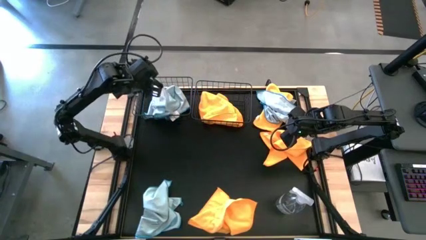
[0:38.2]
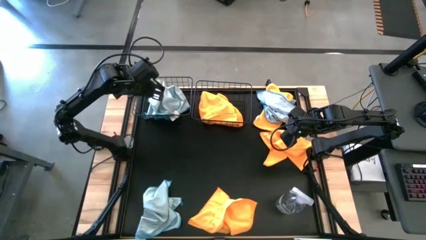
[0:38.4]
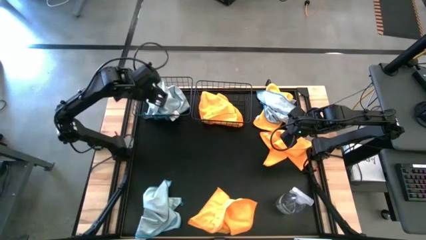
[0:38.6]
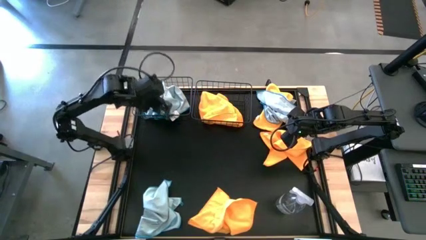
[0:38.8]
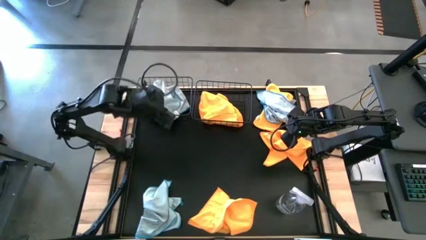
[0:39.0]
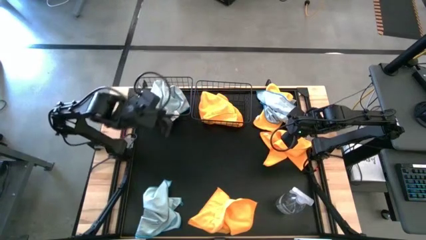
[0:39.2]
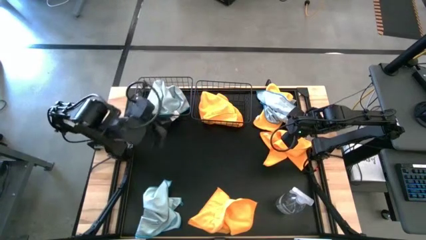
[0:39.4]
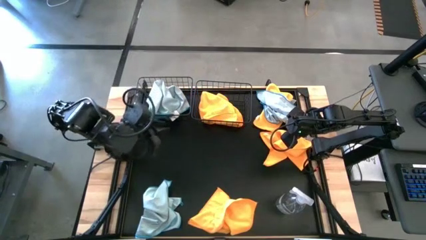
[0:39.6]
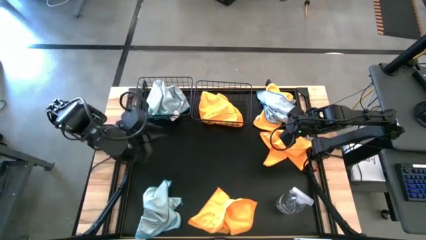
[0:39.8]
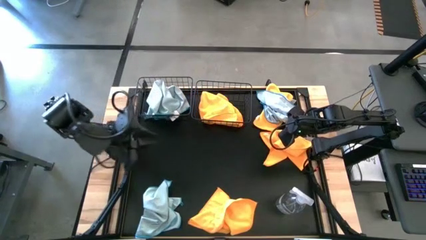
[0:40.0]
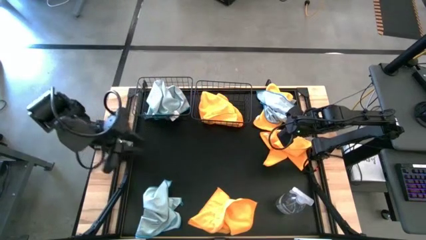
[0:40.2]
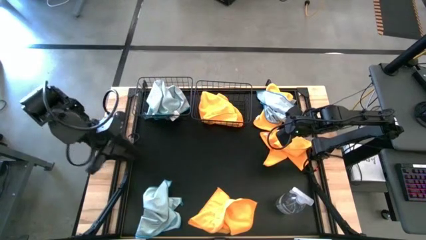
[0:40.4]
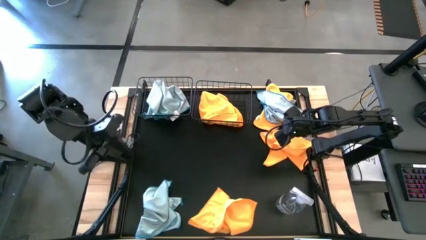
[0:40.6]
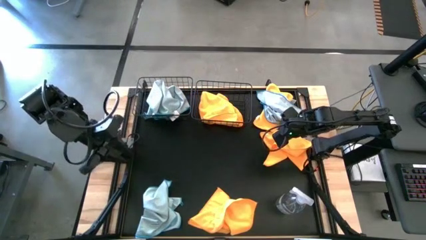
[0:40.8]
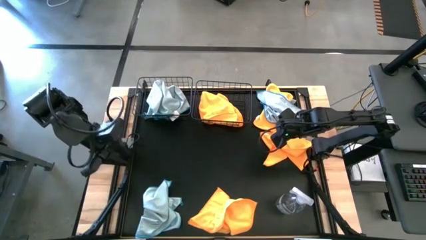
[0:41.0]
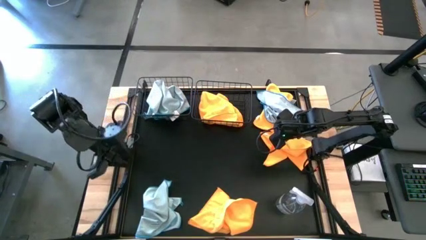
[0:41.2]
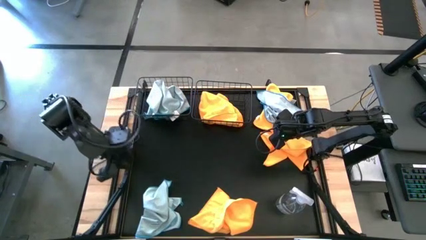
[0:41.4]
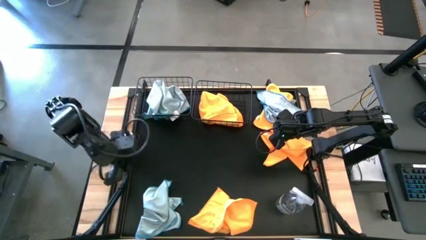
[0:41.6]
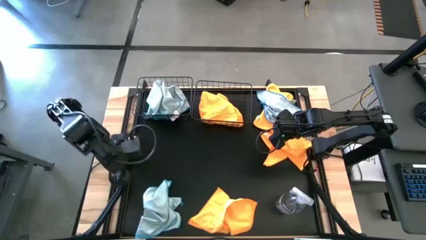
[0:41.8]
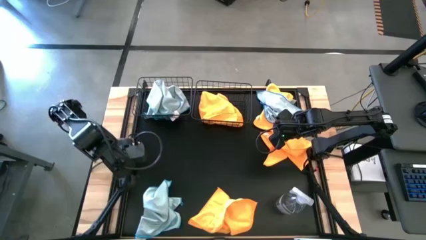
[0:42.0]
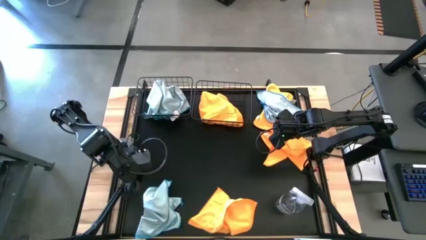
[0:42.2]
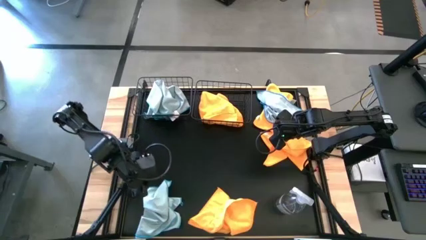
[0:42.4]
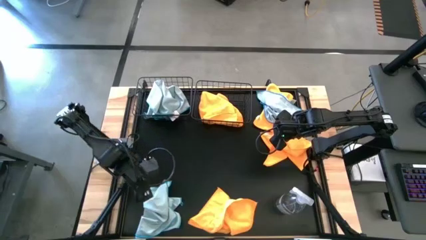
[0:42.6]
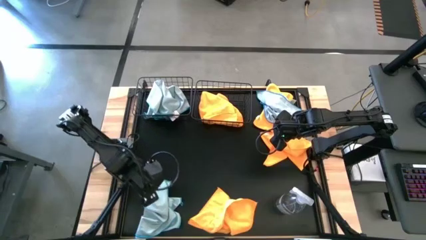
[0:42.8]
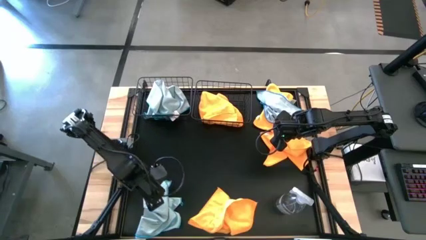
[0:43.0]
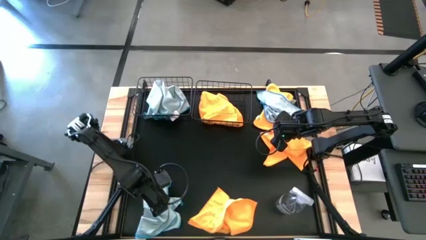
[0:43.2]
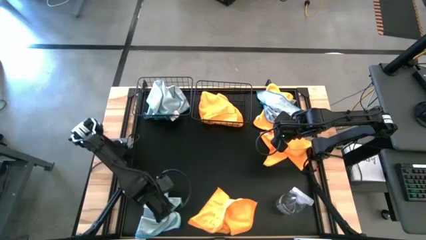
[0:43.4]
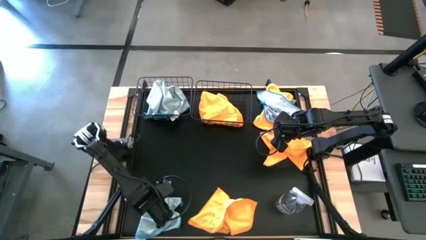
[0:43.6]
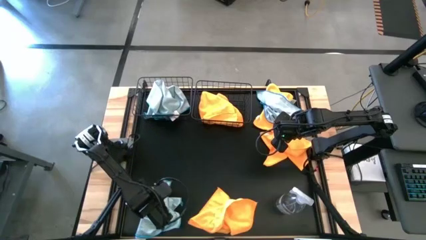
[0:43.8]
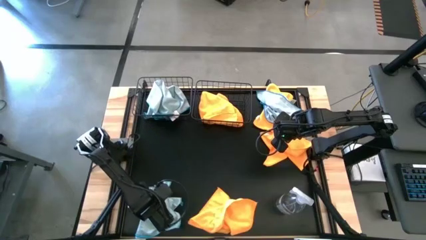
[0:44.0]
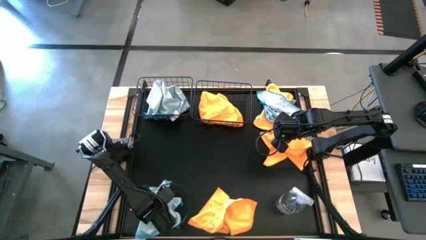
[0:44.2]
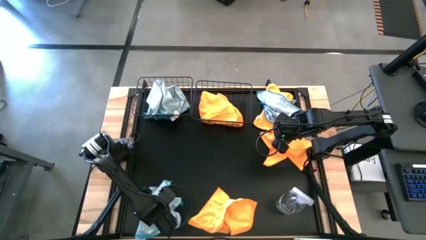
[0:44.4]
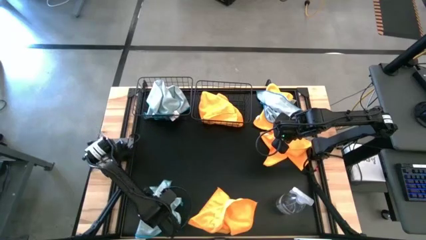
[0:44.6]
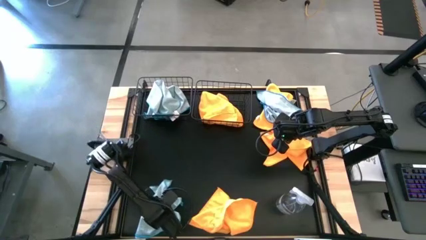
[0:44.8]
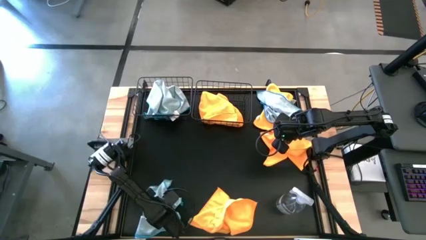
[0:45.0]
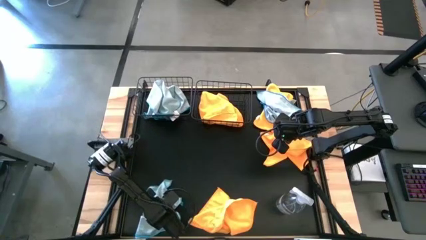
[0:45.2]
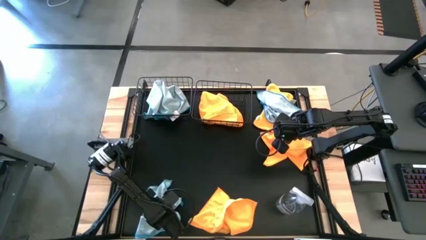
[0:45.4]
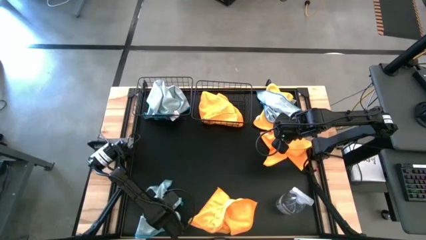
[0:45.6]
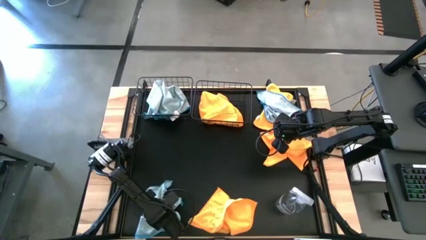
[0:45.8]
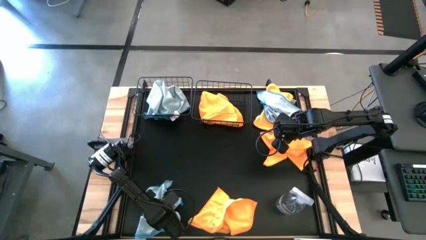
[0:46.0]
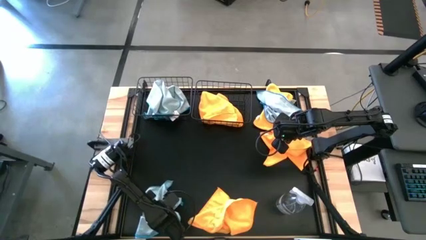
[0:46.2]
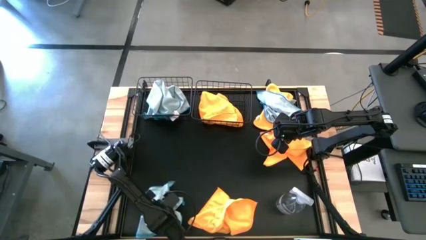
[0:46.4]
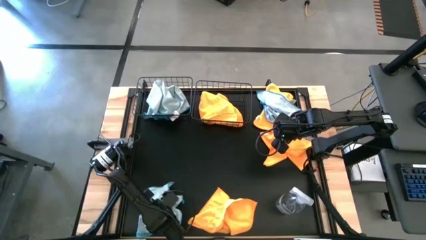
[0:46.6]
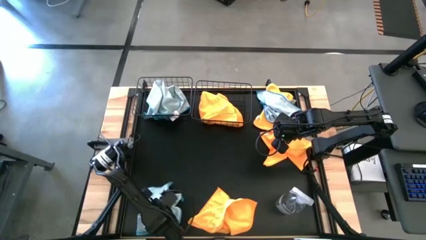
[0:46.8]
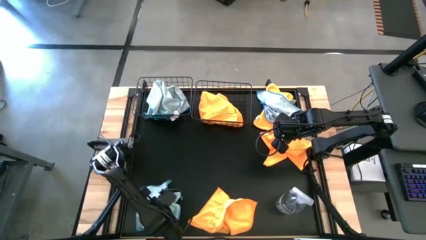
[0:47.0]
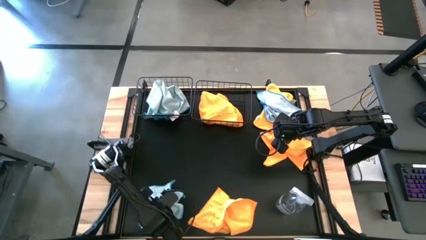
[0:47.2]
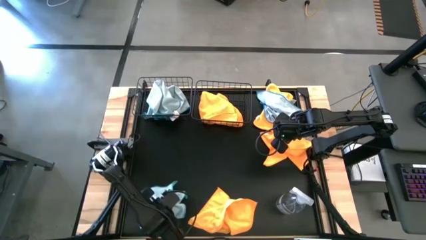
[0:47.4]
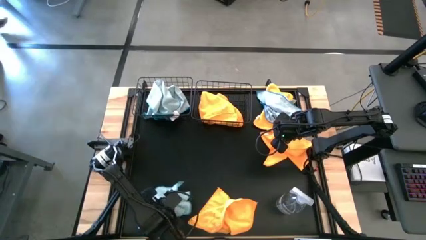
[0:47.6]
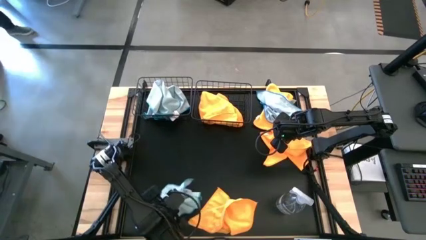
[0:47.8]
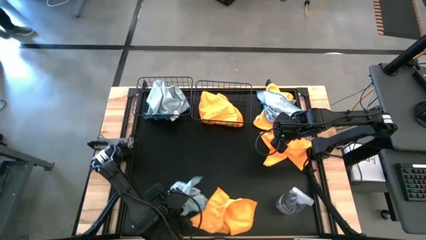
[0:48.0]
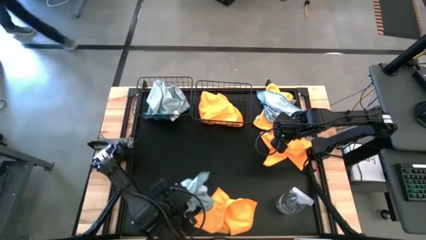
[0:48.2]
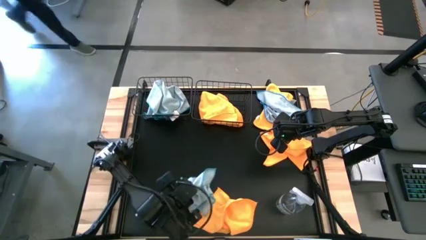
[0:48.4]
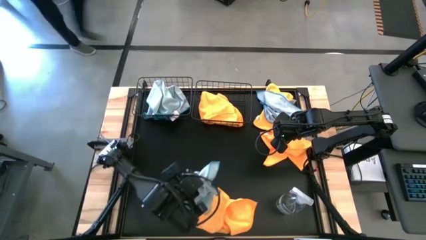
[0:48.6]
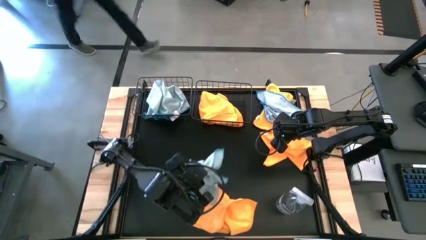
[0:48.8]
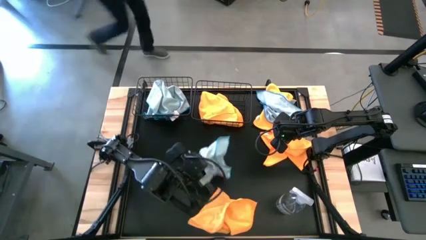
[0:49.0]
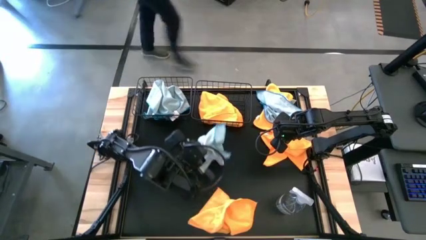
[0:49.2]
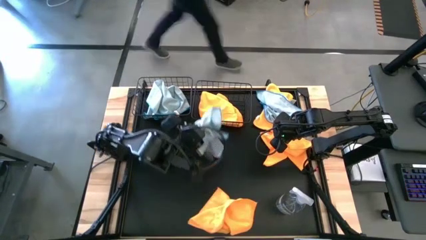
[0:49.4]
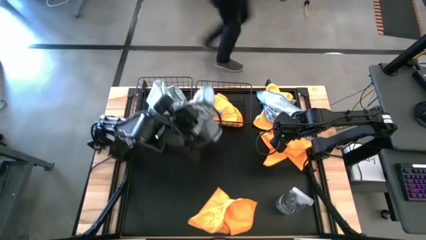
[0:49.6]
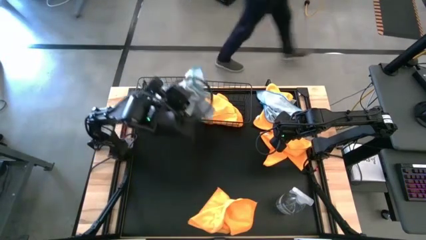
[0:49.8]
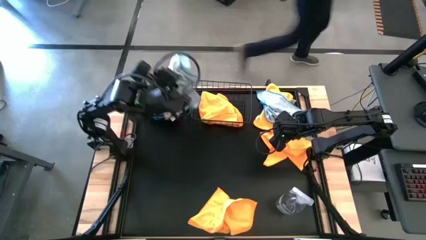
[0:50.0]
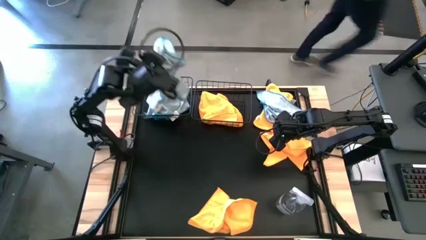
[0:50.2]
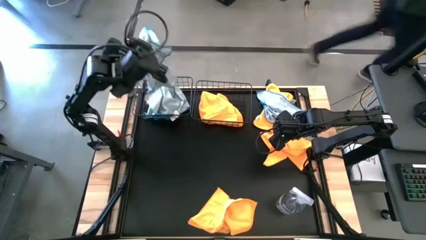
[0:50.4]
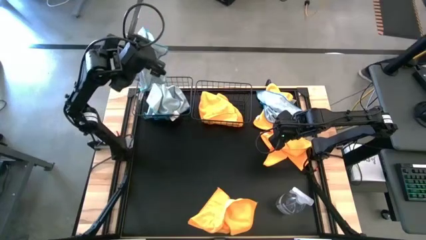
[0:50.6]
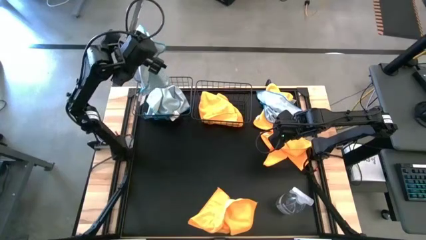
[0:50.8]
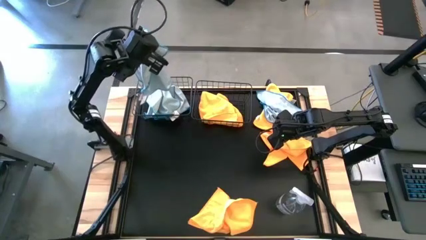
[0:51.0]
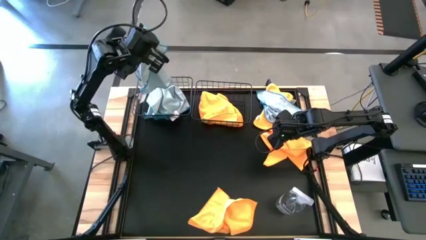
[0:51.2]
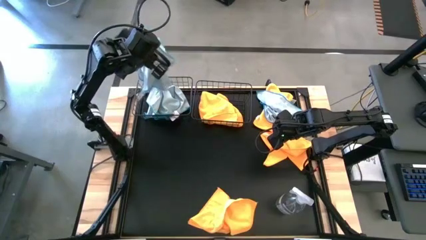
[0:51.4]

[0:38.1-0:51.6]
Task: Sort microfiber towel by color & place in baskets
Put the blue towel into the left black wire basket
